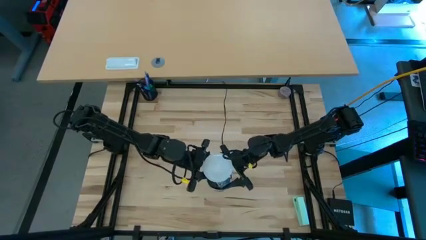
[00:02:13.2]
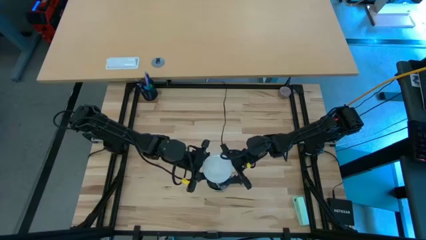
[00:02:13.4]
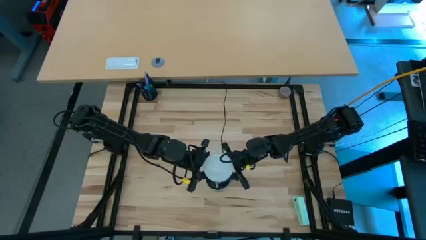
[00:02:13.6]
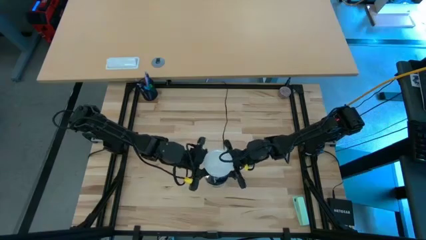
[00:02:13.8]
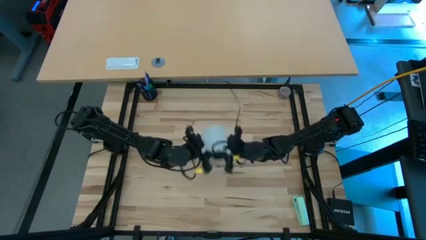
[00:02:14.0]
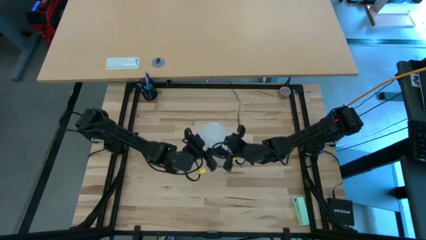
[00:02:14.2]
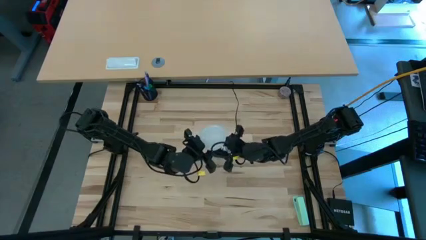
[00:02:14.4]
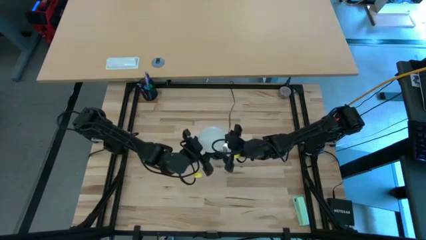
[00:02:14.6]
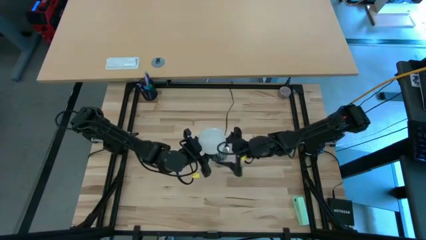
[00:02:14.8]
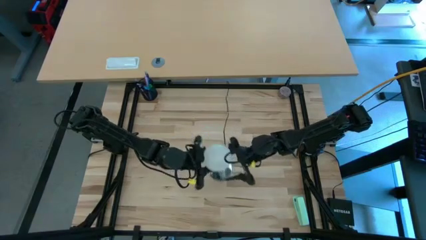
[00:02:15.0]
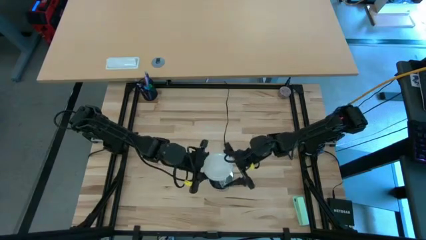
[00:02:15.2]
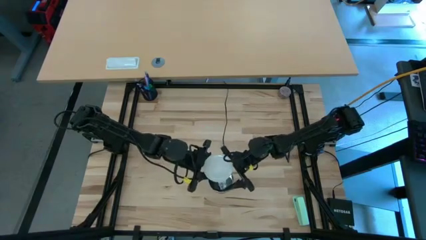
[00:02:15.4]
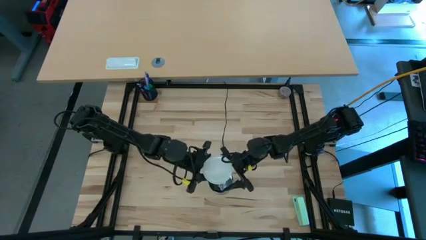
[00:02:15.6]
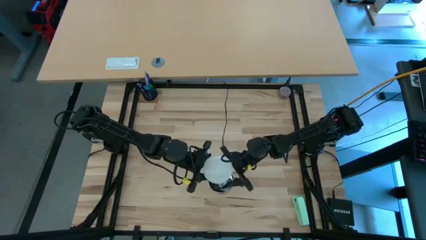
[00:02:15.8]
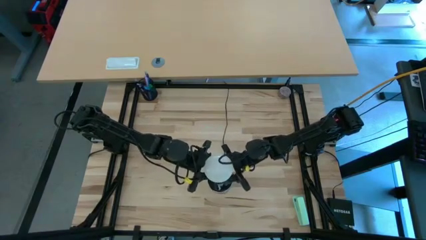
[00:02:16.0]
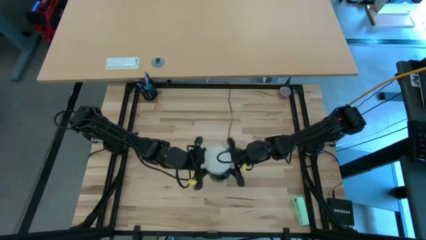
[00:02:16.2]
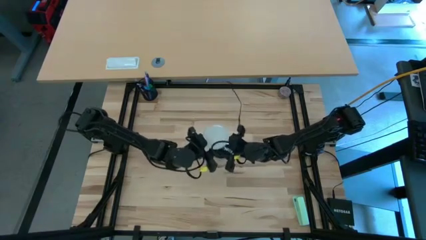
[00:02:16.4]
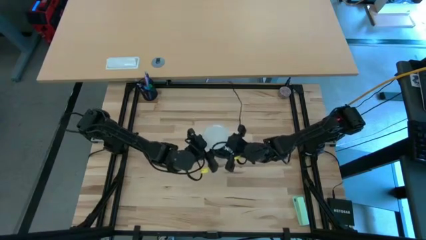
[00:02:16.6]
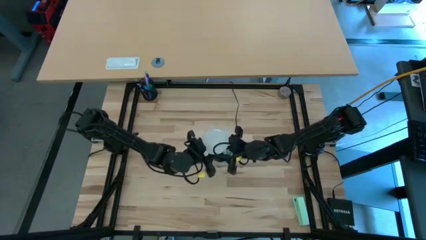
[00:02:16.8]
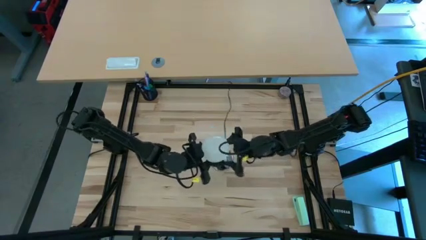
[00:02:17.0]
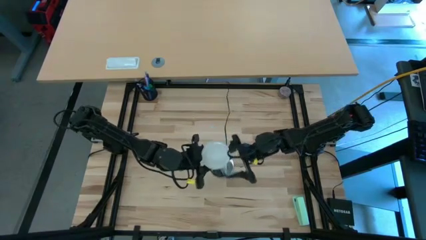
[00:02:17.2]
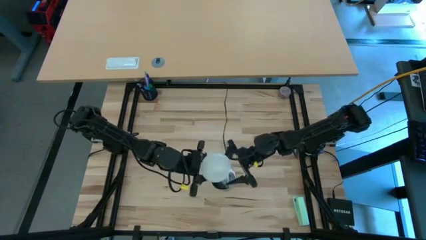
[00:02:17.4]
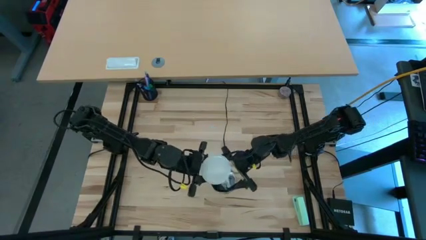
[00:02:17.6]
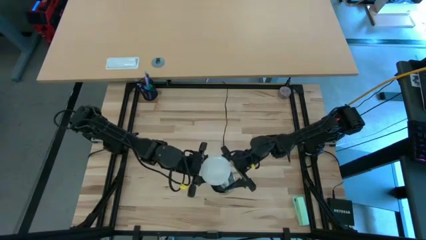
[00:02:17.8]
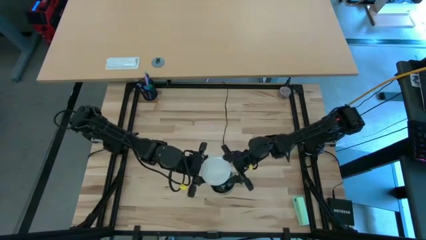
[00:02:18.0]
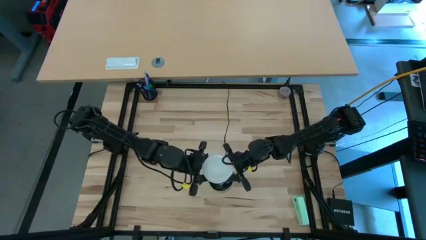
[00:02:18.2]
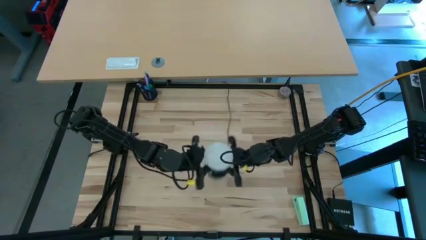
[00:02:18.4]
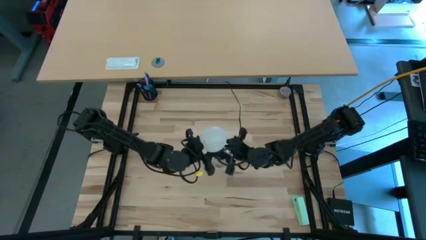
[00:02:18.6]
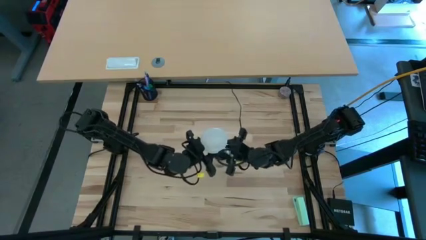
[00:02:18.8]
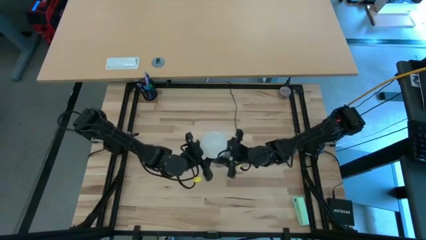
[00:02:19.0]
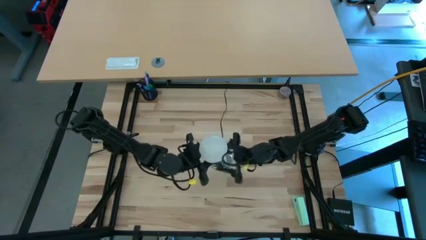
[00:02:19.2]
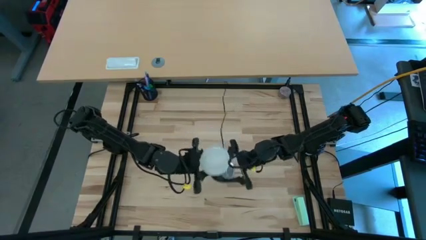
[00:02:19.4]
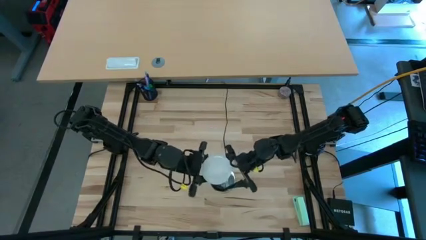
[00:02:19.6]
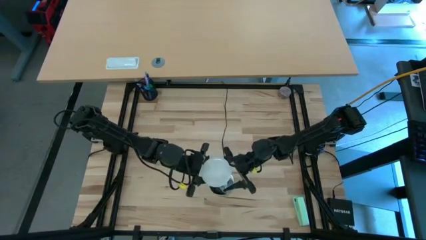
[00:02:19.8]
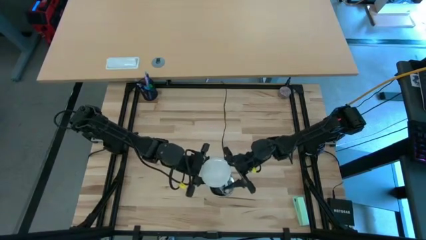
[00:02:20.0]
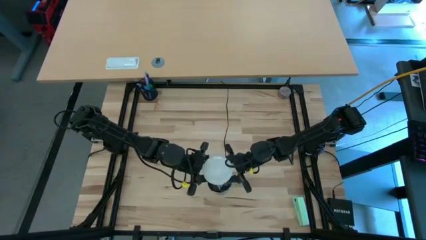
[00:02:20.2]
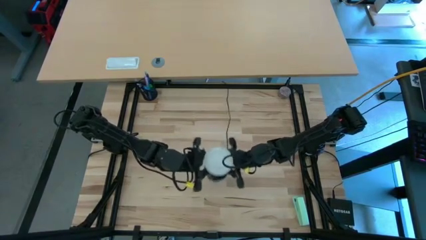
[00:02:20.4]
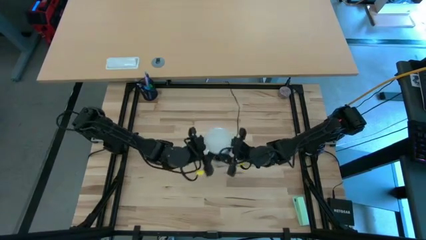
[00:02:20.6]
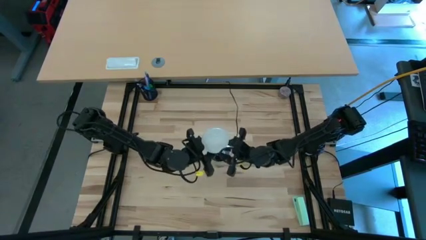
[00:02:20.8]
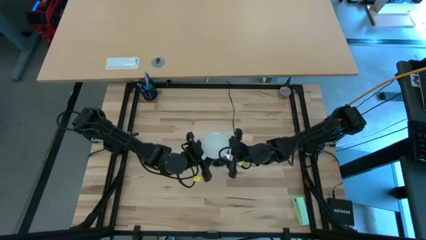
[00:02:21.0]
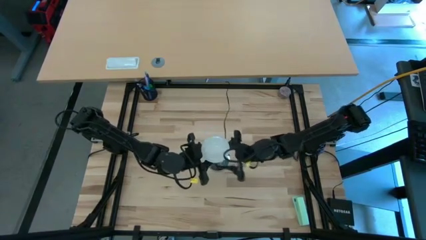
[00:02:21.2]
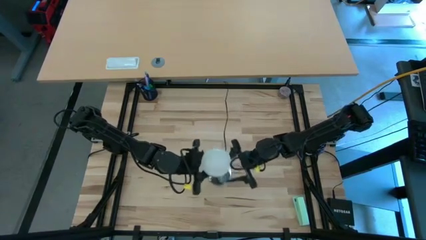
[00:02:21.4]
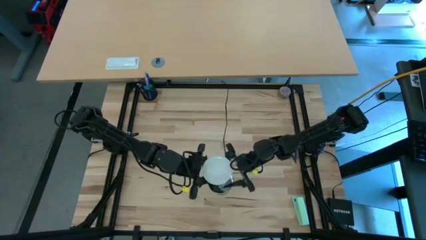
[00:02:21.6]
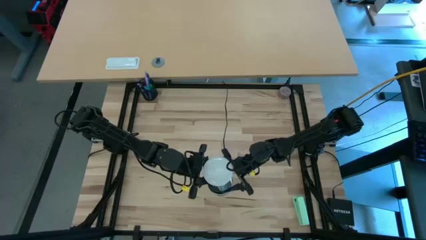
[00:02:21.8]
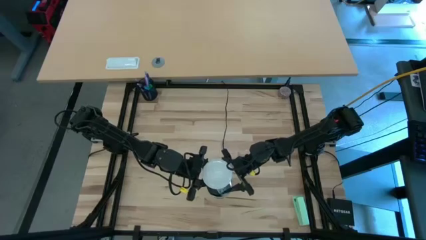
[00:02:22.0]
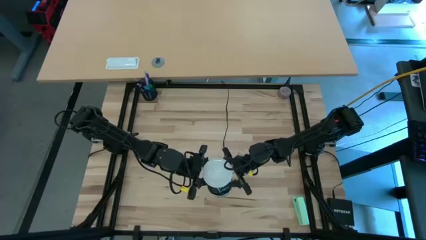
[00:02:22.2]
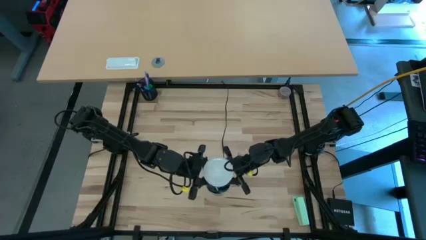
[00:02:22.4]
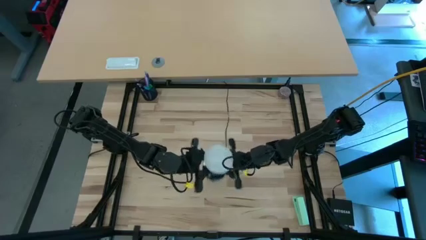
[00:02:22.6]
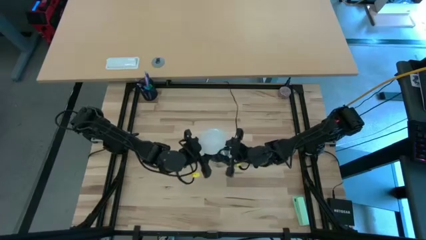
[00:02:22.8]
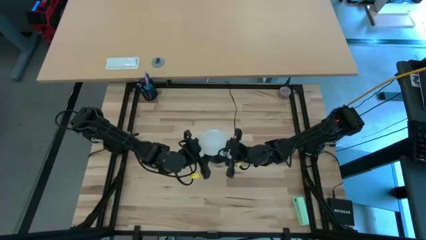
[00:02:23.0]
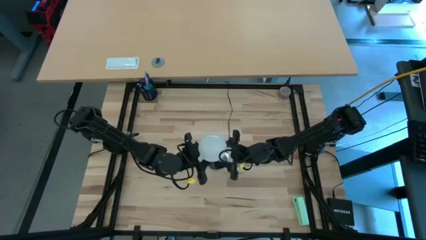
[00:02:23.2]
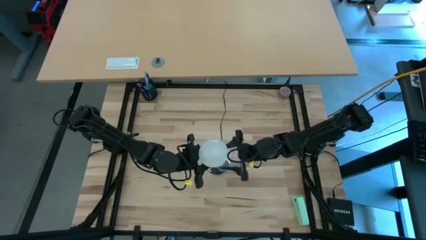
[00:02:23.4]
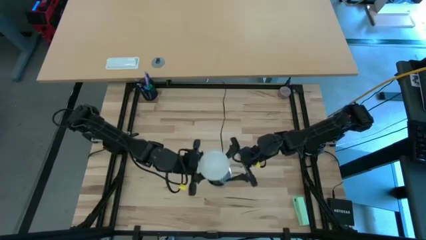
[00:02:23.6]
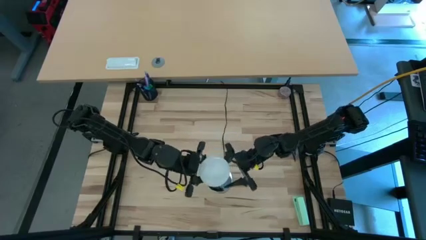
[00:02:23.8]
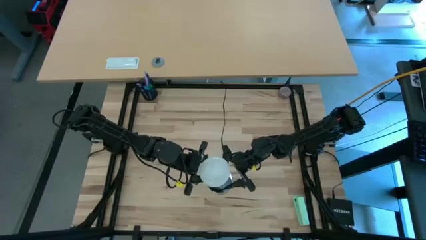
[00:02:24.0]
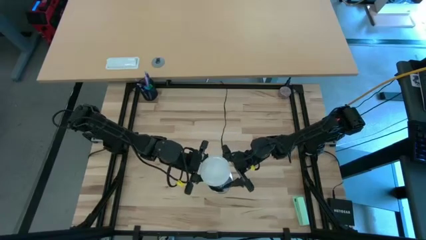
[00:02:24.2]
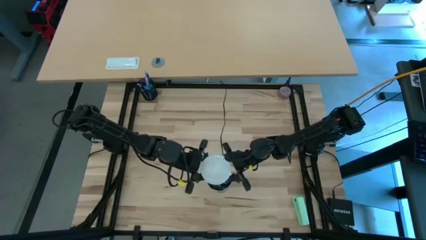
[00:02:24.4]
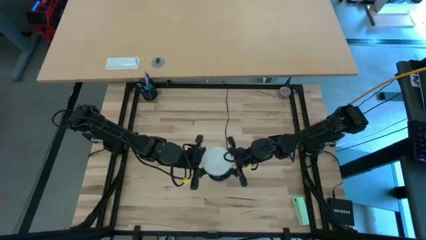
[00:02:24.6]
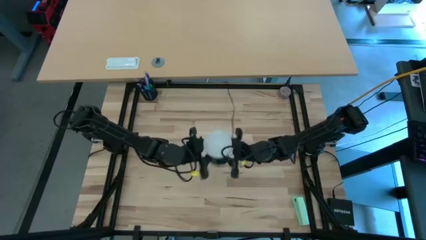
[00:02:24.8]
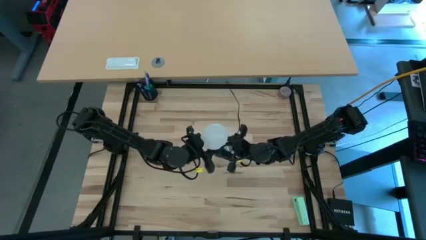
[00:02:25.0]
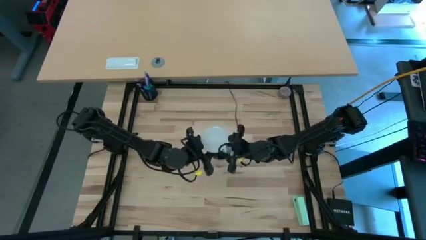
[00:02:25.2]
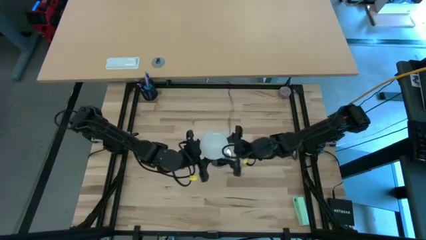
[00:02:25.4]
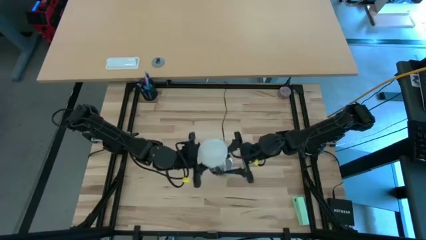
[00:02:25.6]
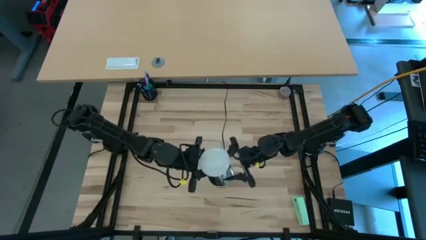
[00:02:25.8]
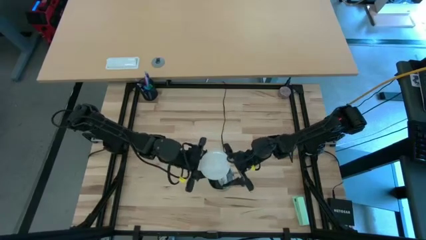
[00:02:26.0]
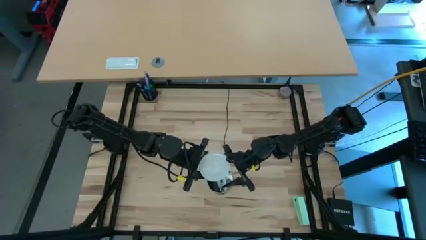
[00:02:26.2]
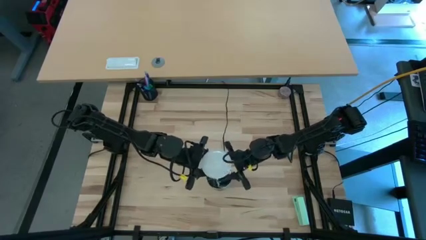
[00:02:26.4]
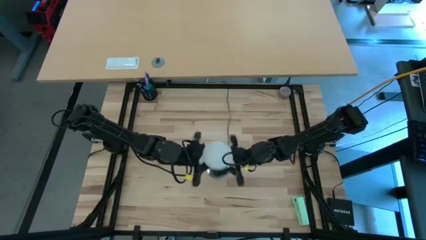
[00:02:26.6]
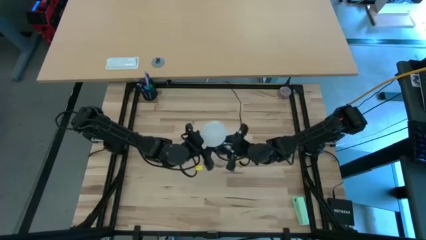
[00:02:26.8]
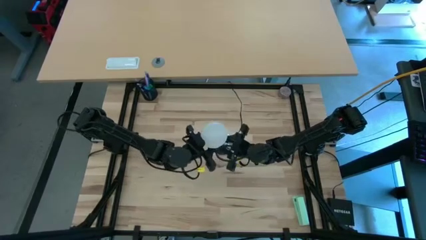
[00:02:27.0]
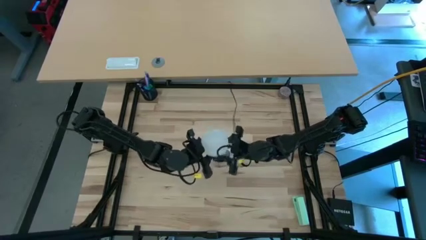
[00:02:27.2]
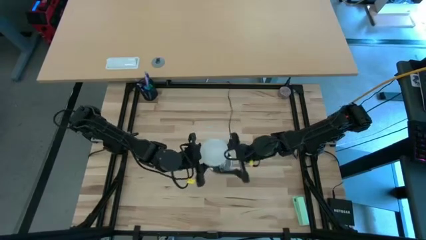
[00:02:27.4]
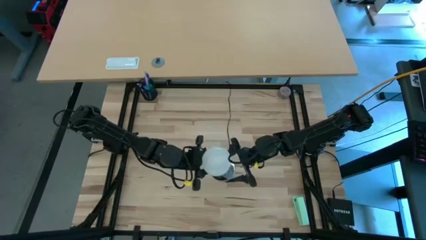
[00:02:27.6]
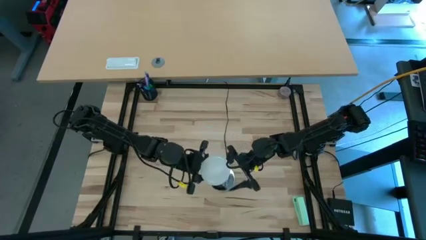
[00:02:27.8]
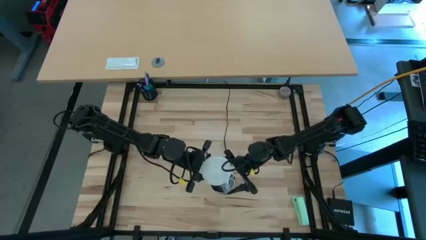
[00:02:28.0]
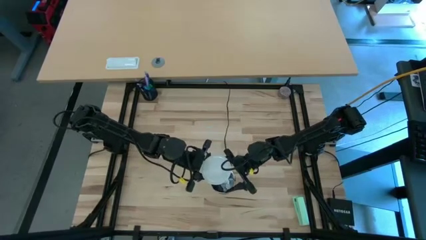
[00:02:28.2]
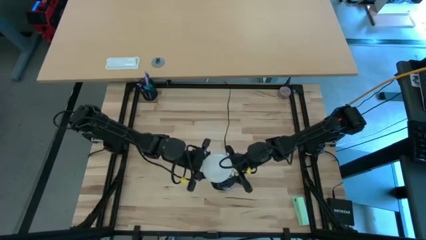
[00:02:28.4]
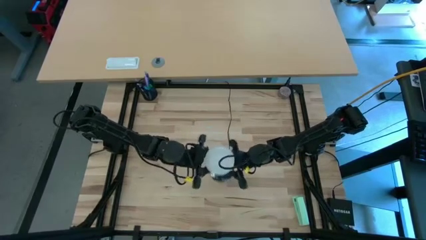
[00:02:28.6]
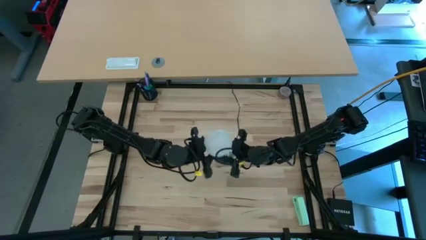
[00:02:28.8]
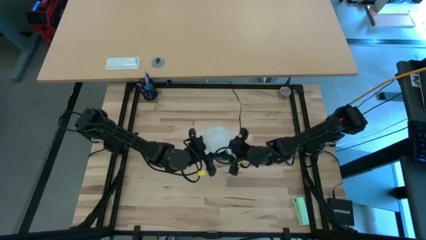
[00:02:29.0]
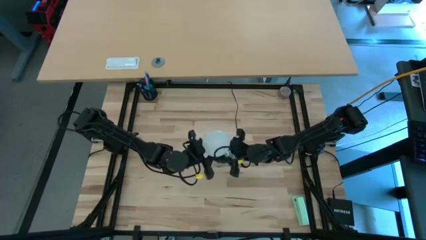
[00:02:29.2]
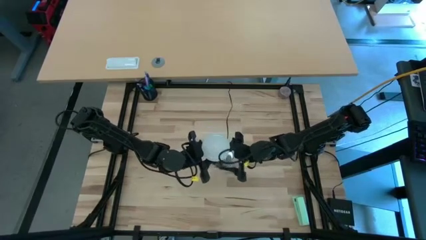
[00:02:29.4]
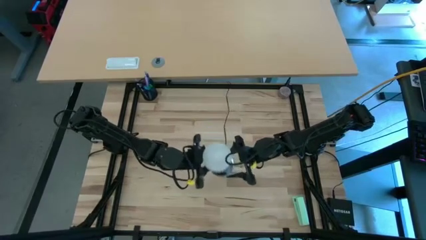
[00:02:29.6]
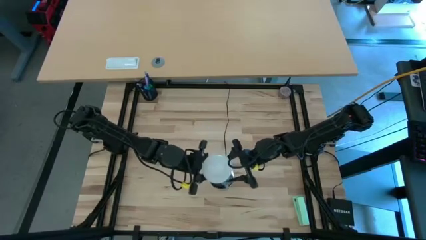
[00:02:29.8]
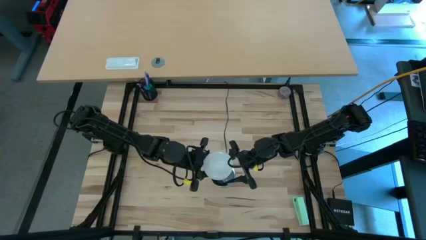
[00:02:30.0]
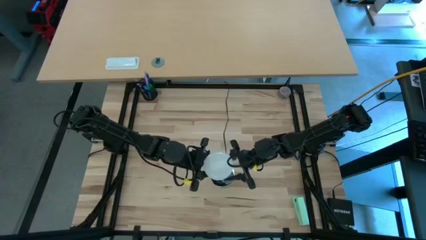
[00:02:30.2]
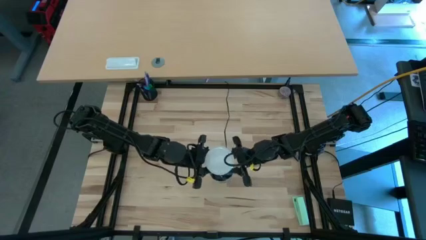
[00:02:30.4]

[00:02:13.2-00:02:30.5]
Task: Screw lightbulb
Remove the lightbulb from the lamp
